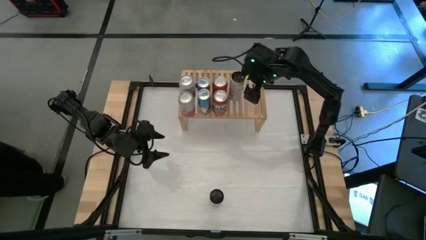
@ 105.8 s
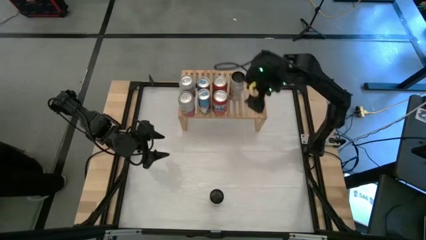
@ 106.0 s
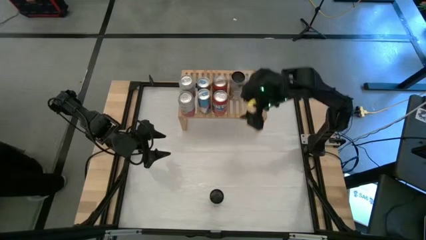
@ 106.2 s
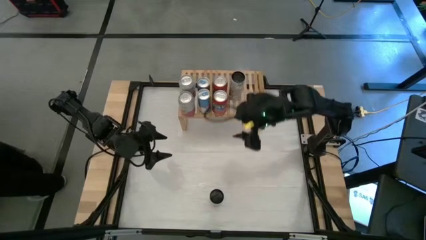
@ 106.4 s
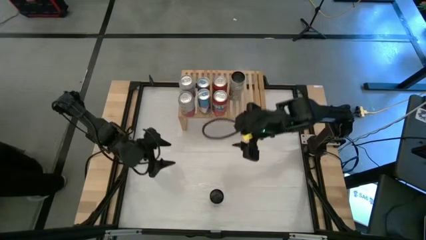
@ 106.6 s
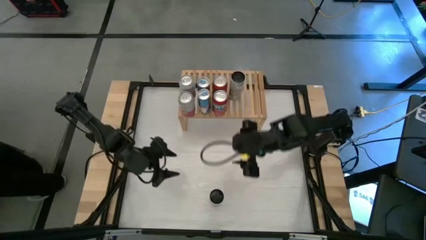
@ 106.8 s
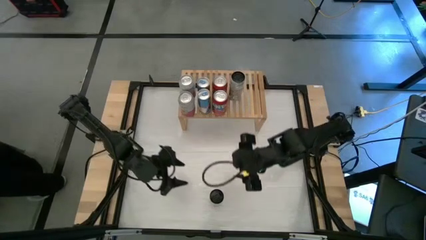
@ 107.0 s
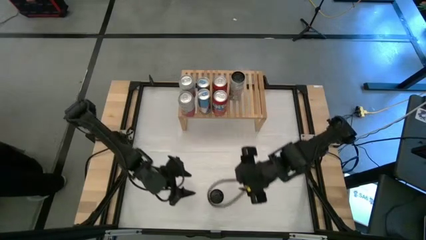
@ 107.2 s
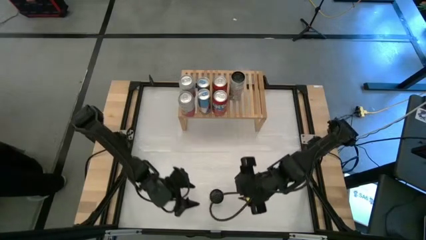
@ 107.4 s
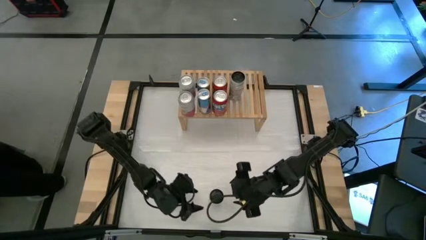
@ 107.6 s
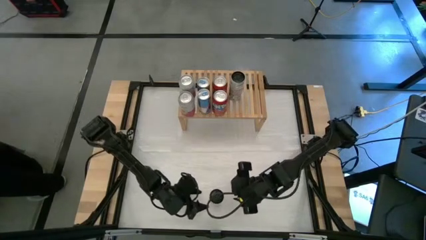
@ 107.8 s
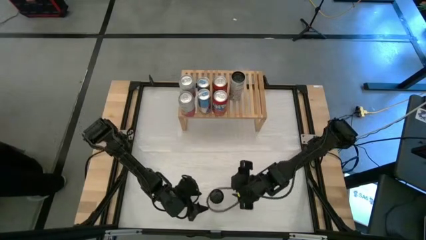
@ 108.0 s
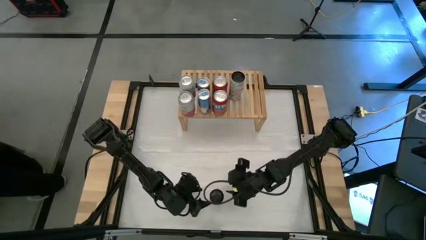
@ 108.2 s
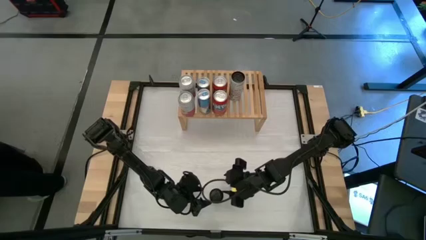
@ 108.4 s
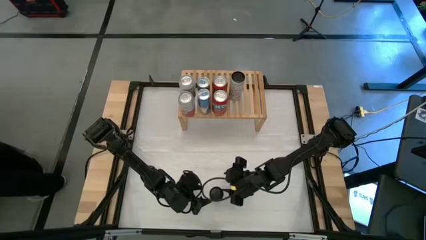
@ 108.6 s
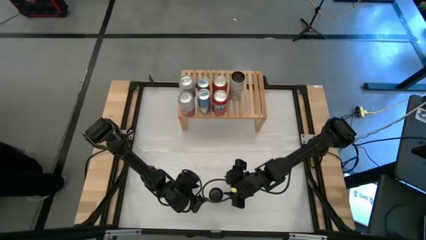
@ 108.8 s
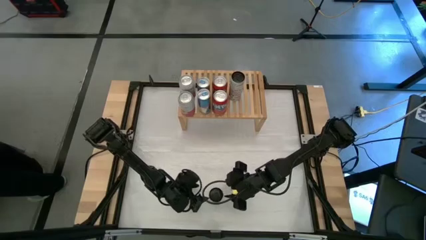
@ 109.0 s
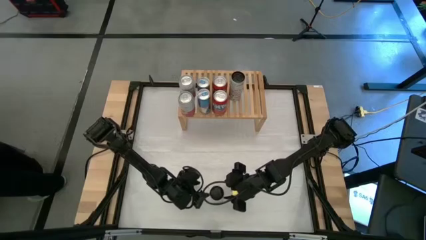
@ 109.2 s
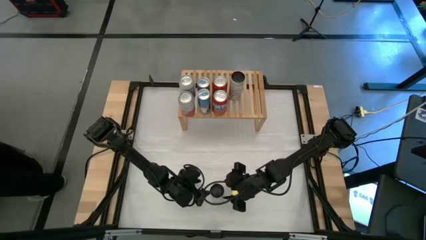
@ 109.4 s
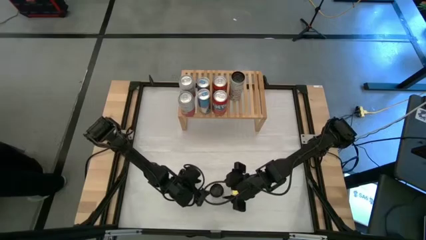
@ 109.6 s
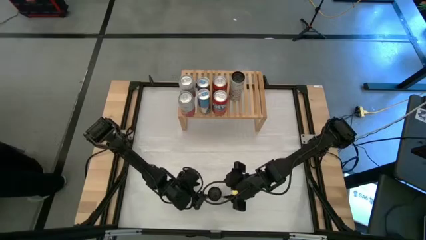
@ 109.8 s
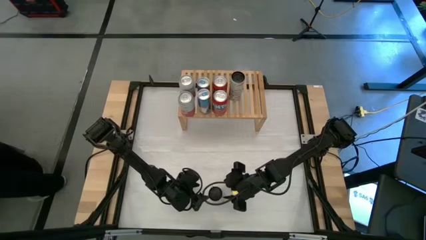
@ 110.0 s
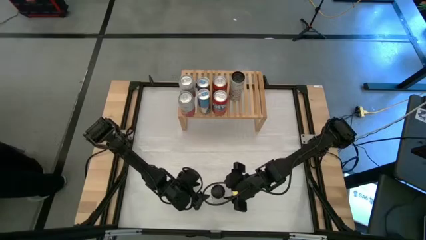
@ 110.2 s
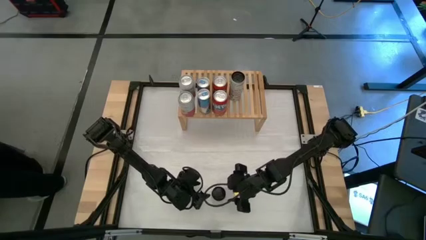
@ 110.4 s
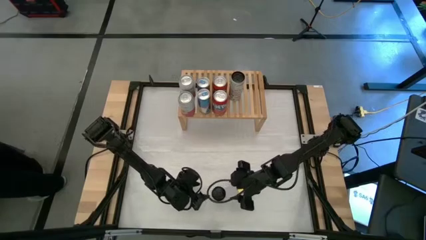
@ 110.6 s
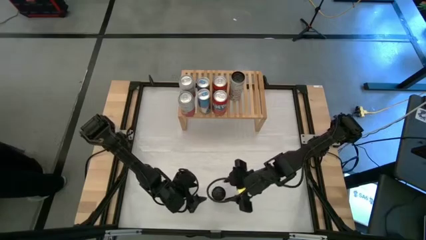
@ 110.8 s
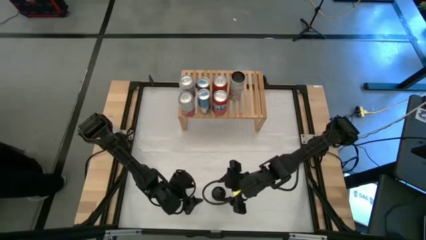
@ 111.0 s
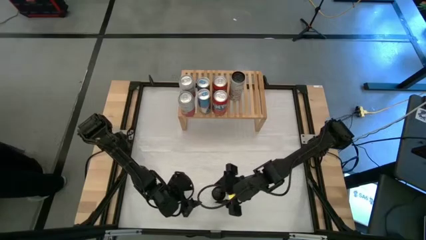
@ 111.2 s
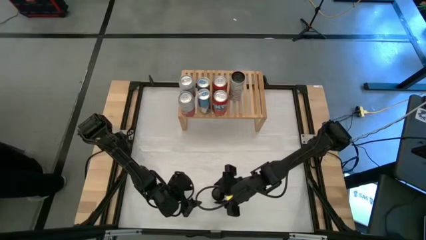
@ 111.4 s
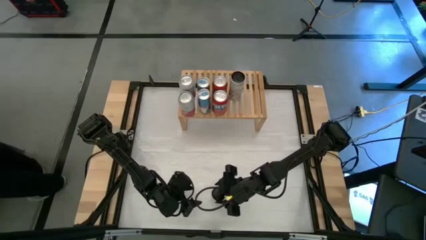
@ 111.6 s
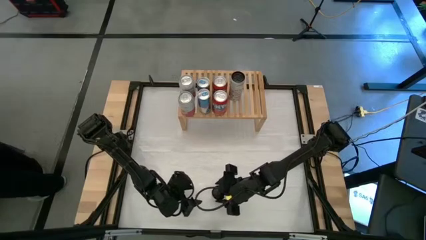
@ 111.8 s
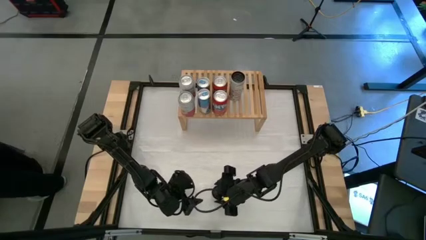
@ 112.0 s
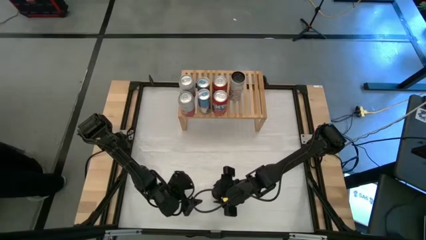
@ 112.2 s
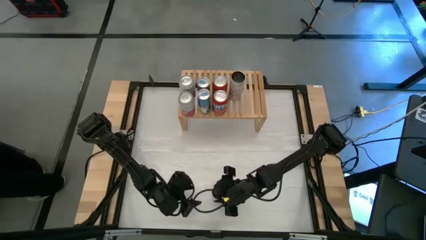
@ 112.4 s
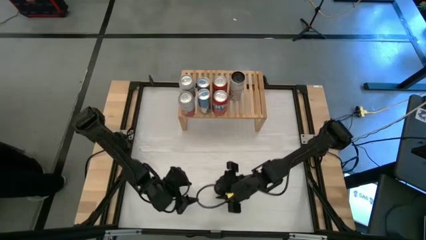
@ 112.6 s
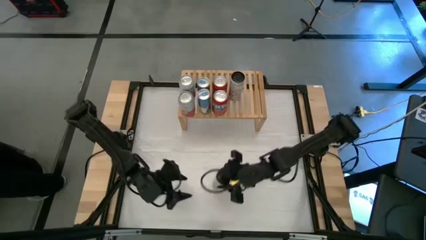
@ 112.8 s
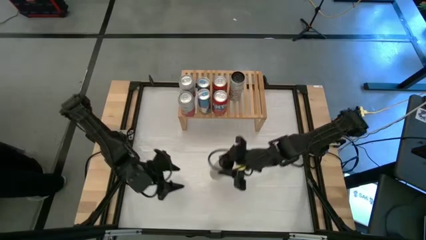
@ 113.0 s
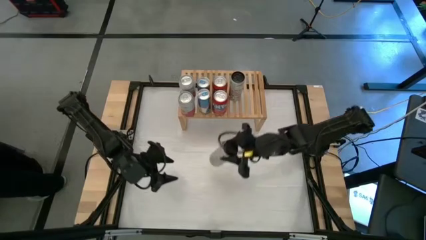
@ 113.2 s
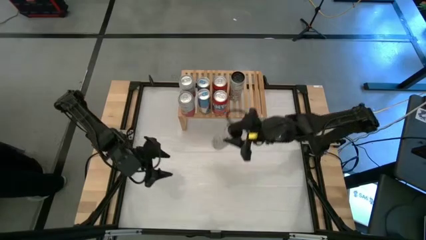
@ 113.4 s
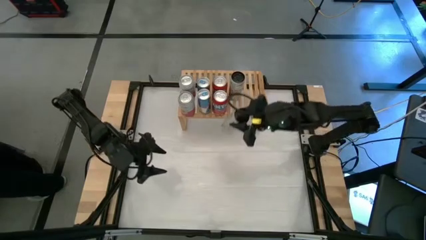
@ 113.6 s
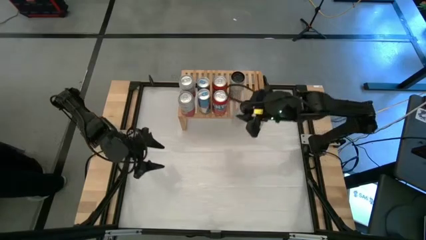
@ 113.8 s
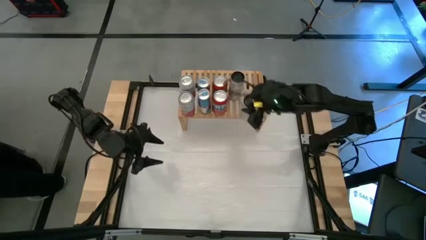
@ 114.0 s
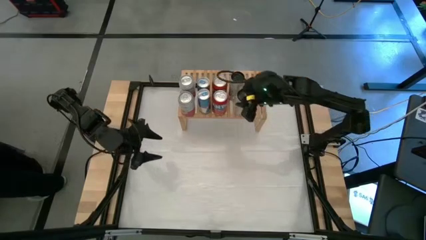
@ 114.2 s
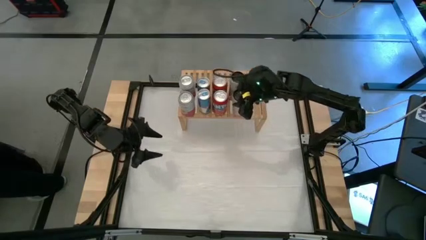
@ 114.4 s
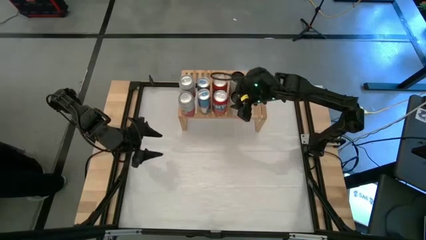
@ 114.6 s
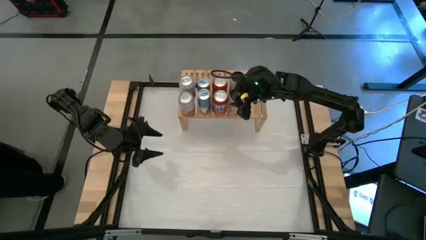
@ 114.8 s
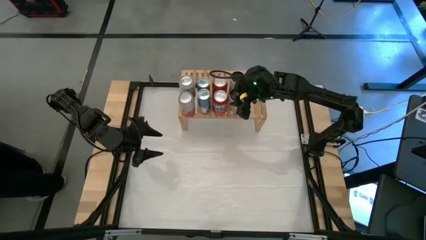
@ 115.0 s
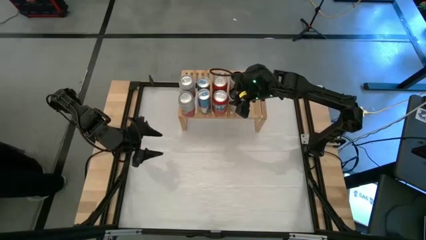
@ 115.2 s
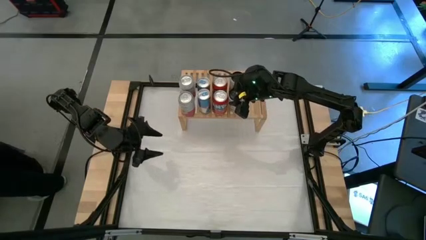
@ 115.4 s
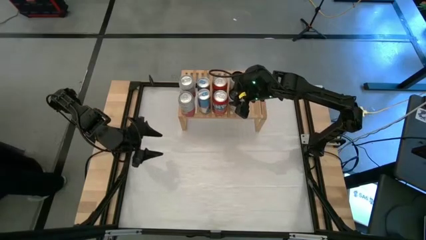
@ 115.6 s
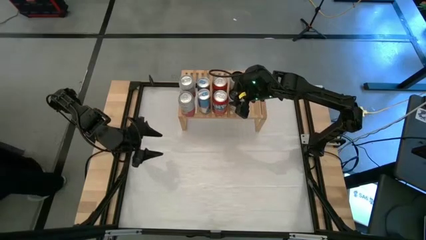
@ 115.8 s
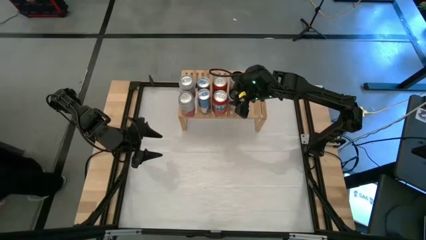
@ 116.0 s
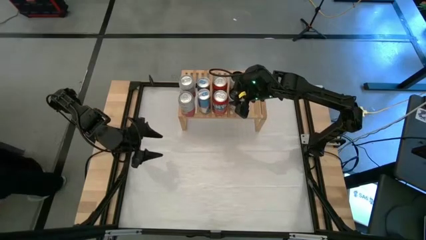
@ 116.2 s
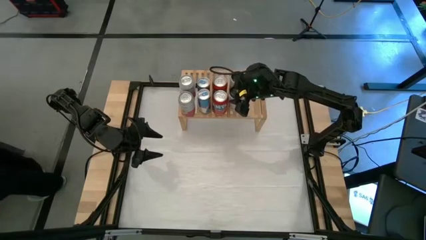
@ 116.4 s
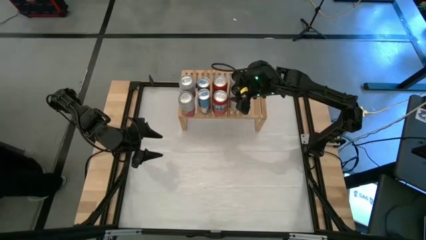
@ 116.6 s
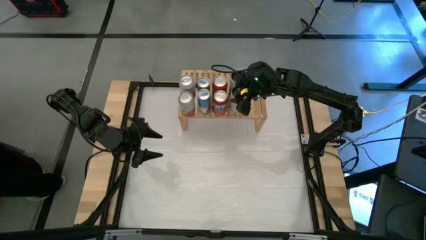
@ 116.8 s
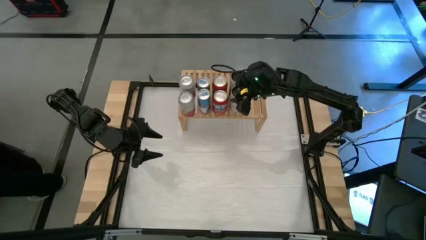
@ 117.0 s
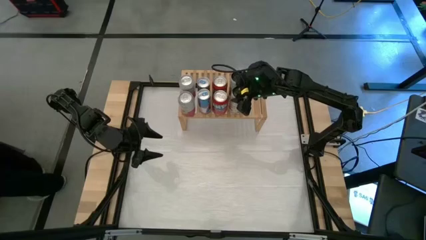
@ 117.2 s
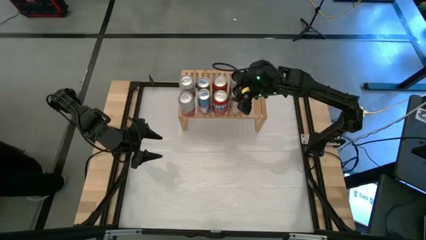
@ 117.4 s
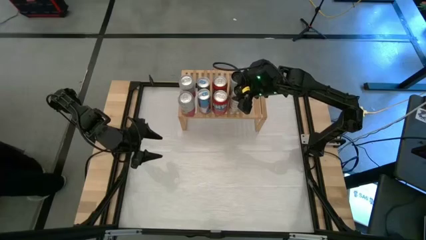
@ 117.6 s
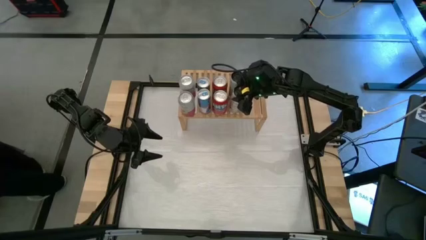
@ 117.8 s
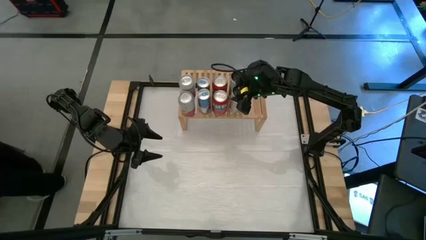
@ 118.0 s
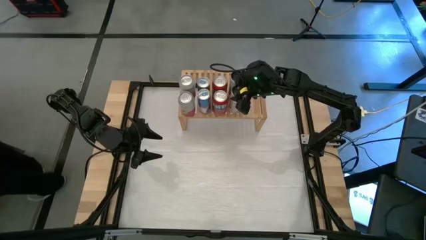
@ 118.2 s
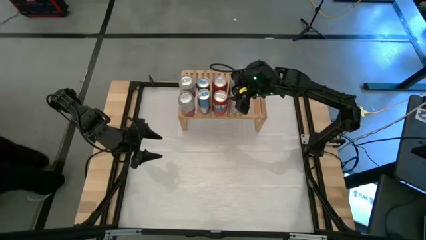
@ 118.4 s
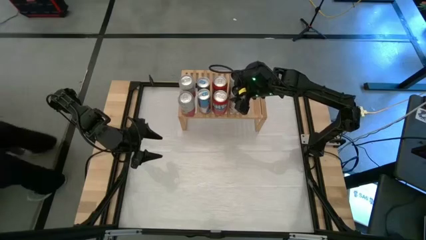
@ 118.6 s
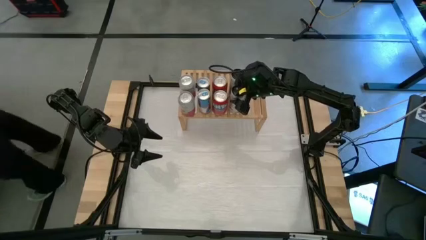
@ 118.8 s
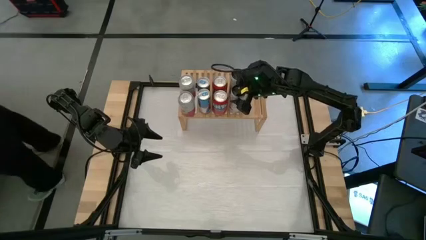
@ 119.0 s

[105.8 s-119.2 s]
Task: Place canned beverage on shelf
Put the white yellow soda can on the shelf aligned with the other white yellow soda can
